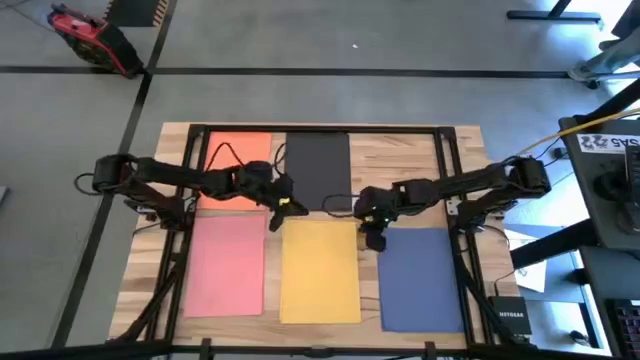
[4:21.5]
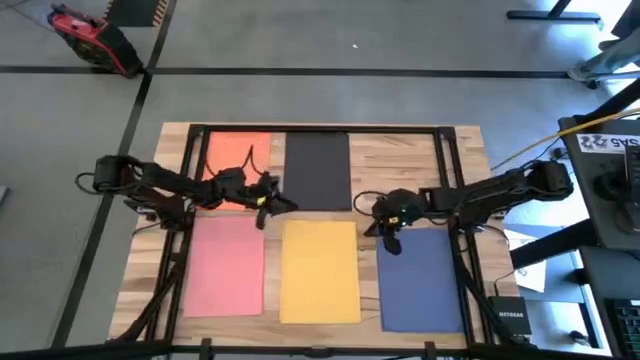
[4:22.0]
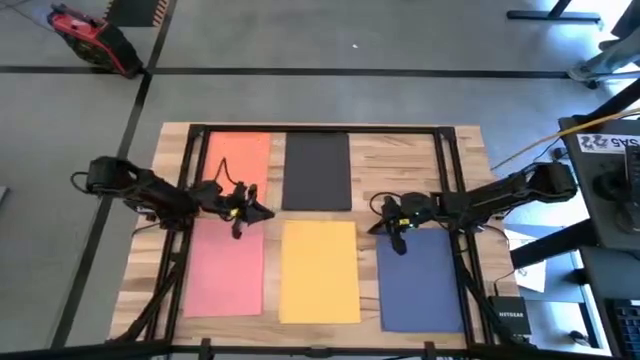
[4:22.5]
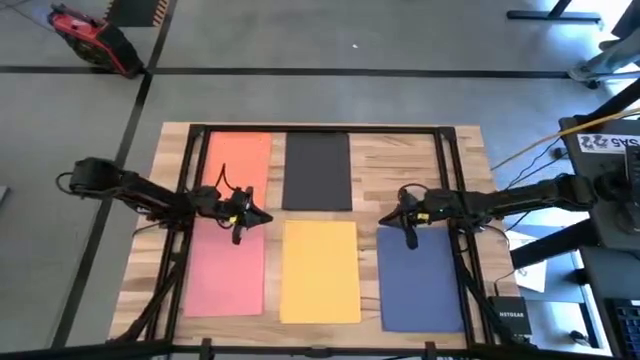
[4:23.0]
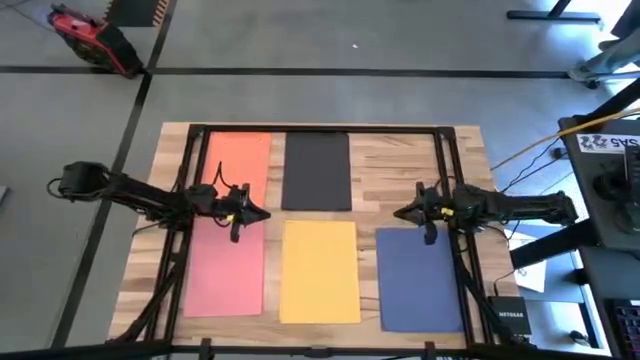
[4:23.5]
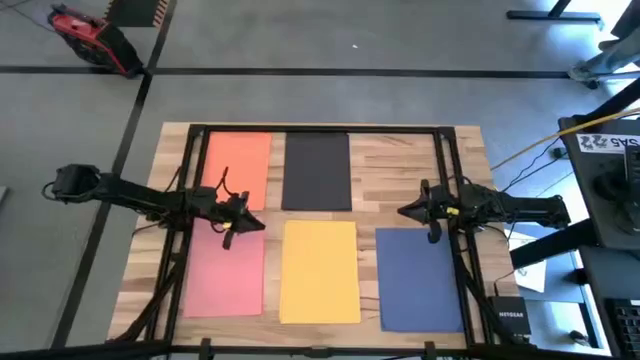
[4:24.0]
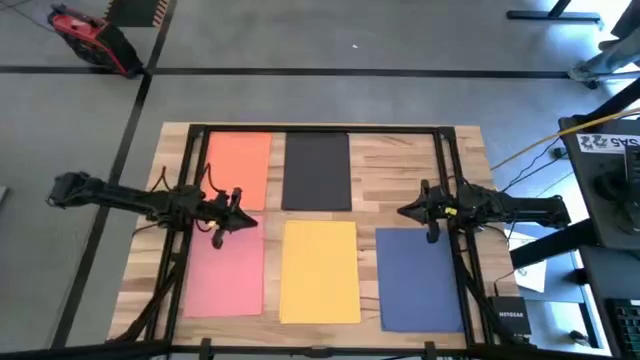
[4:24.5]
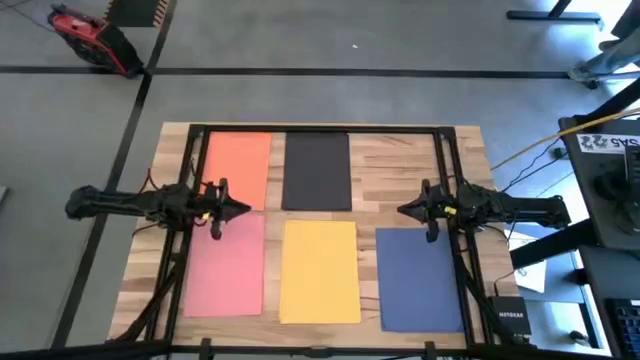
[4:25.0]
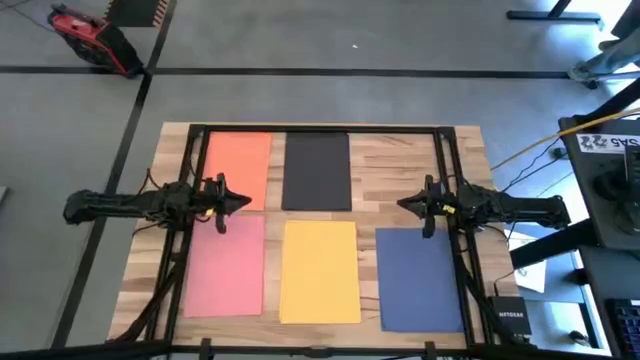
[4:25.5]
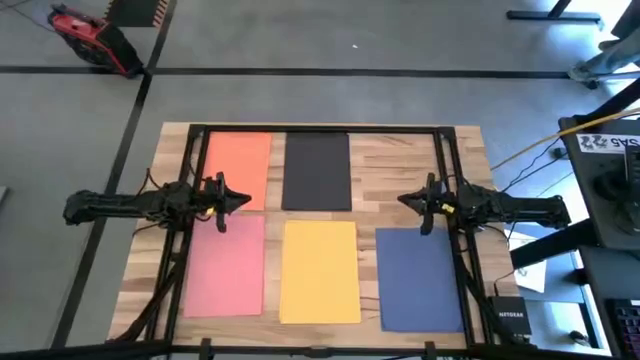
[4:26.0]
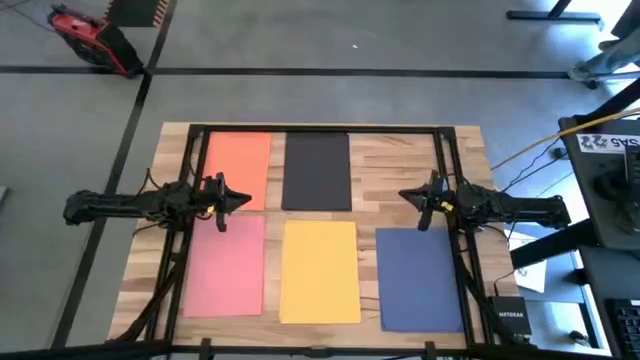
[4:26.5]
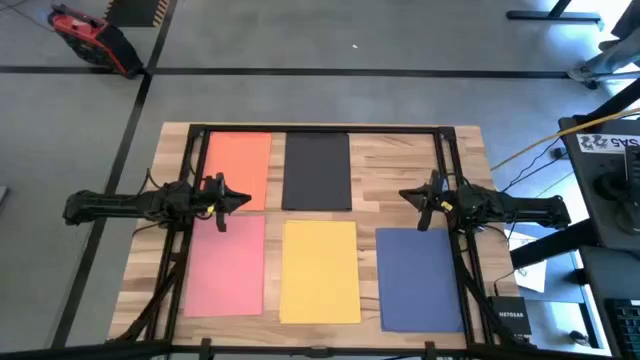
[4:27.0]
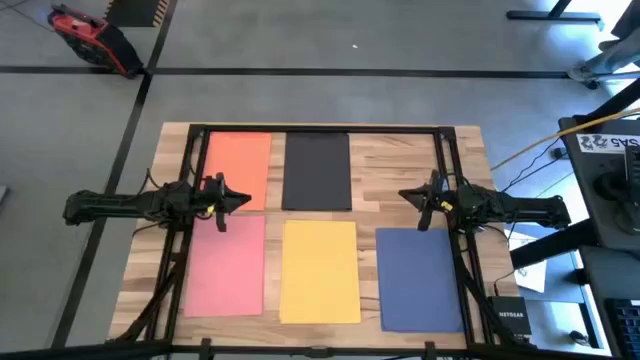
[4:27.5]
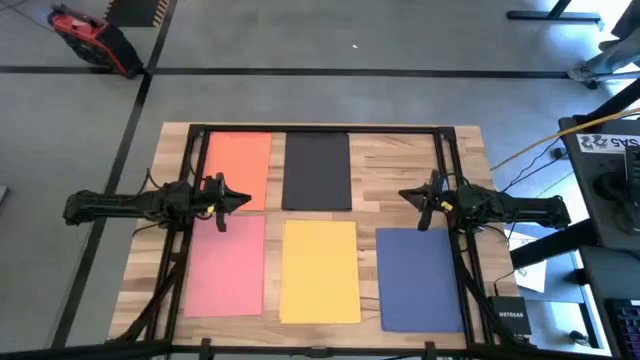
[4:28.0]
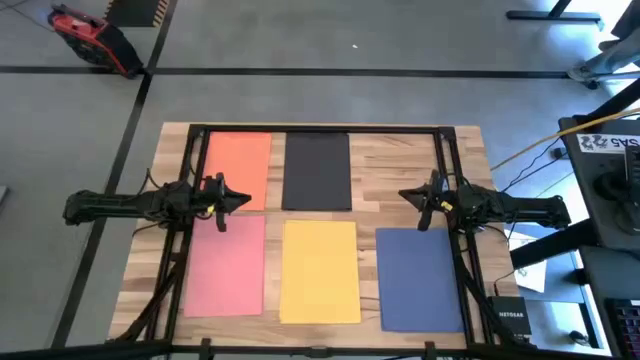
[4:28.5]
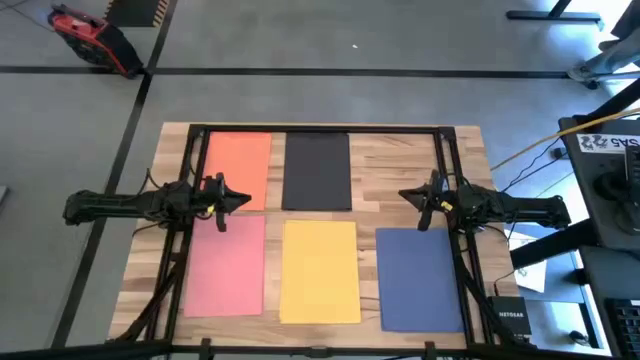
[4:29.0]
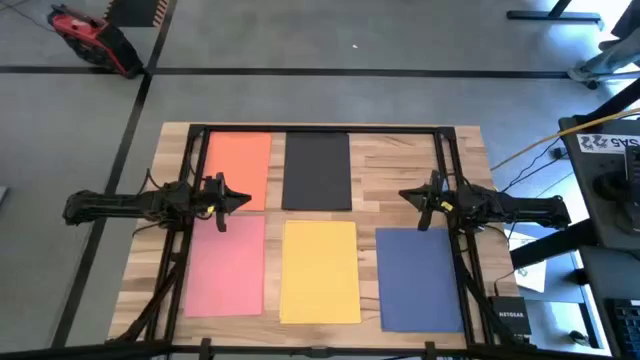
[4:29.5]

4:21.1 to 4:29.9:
Task: Organize paper
Return to Home Position

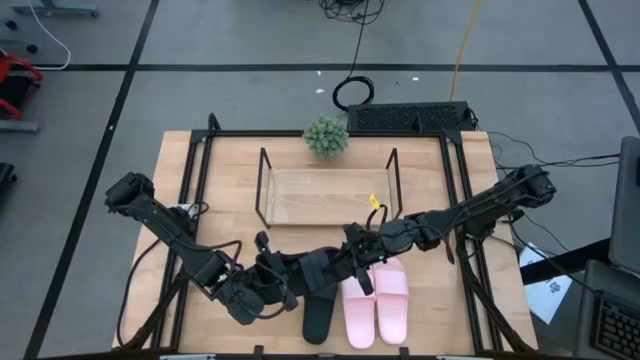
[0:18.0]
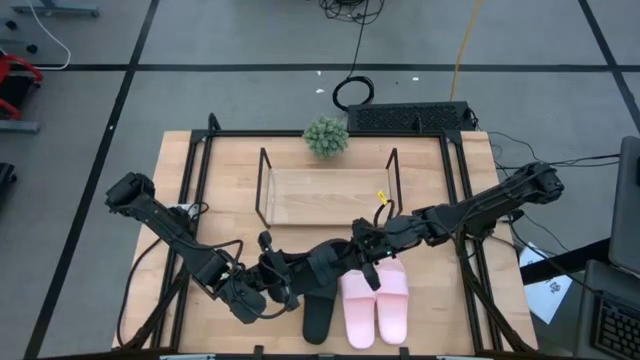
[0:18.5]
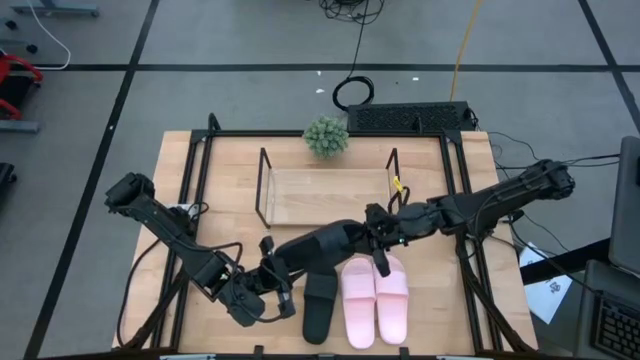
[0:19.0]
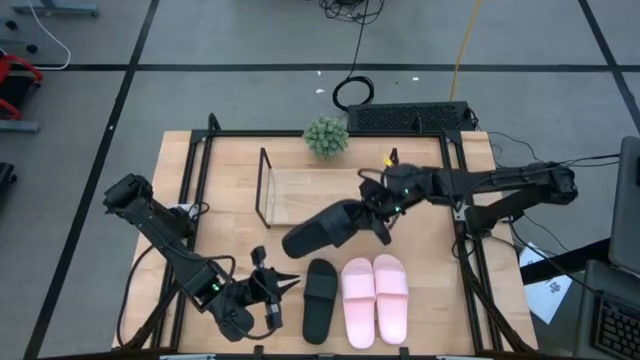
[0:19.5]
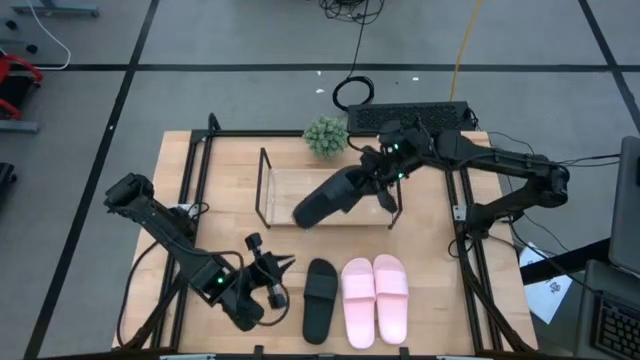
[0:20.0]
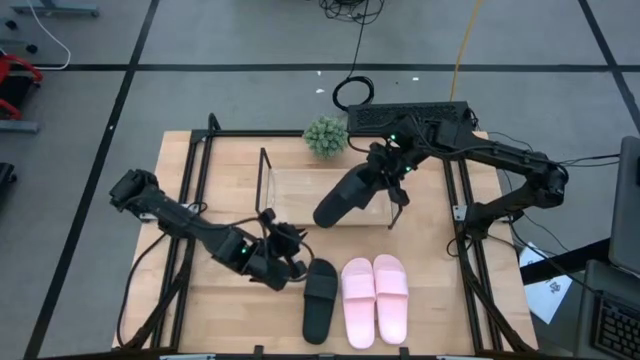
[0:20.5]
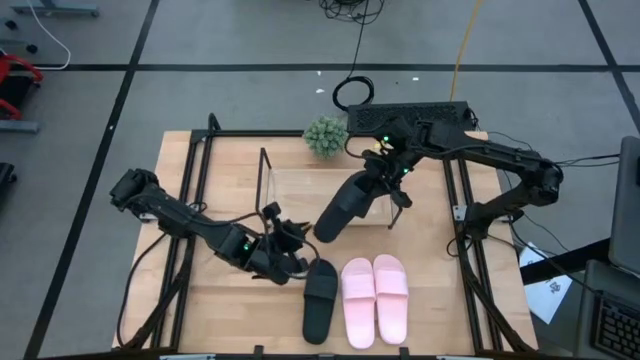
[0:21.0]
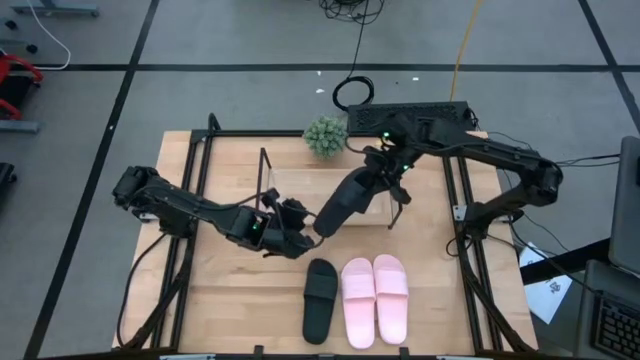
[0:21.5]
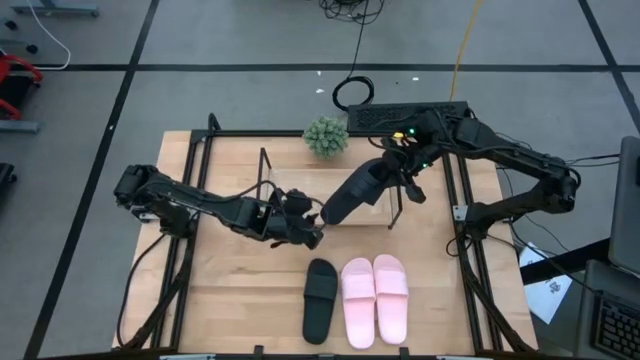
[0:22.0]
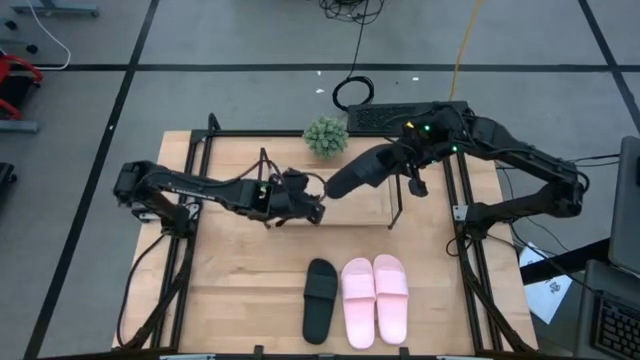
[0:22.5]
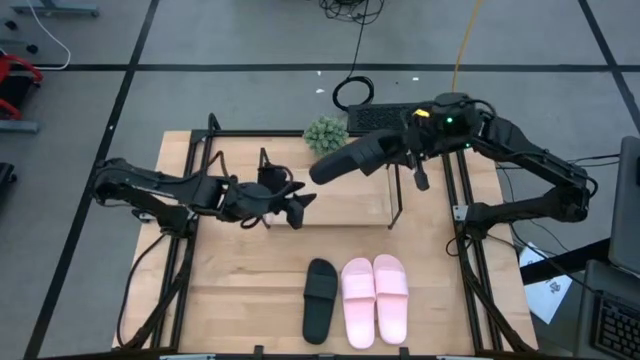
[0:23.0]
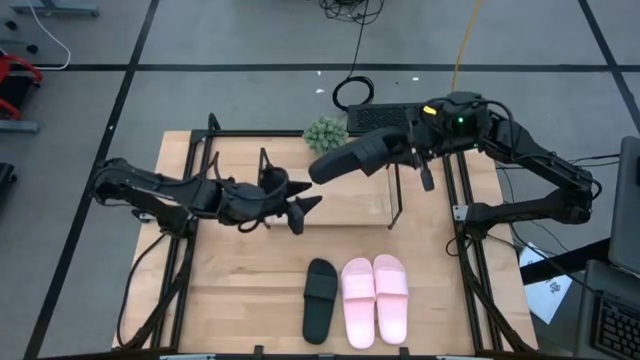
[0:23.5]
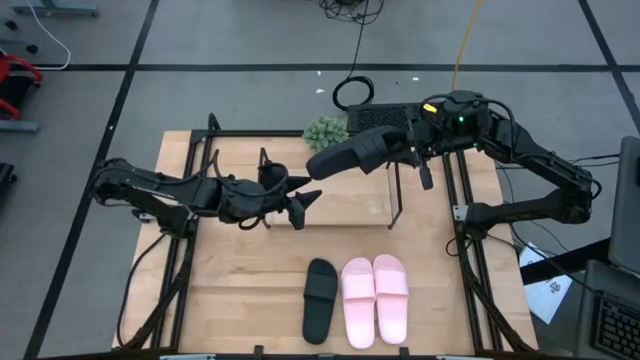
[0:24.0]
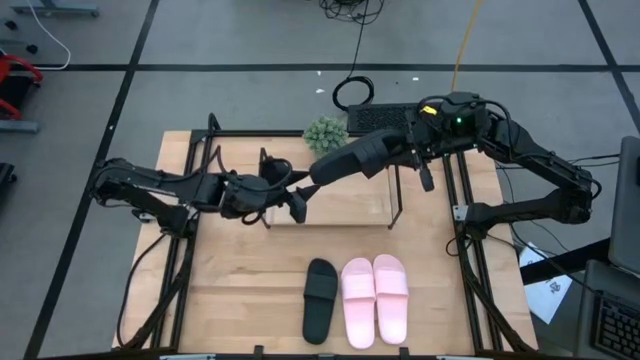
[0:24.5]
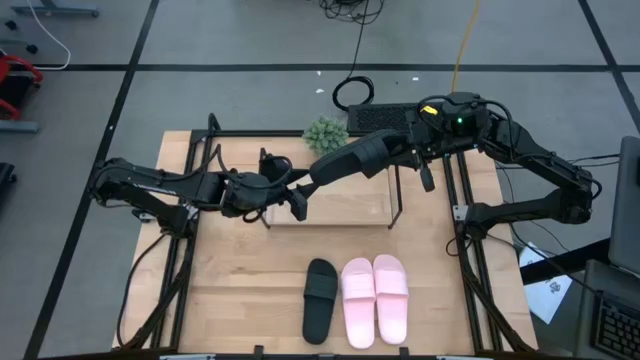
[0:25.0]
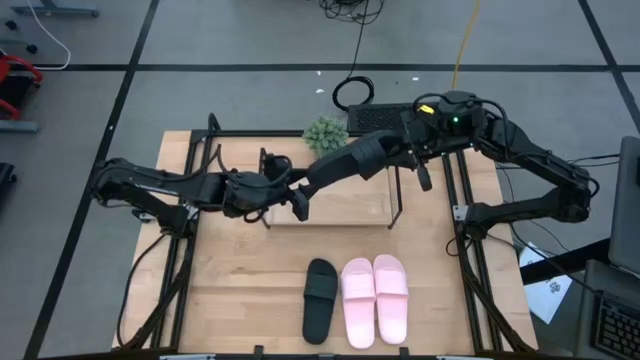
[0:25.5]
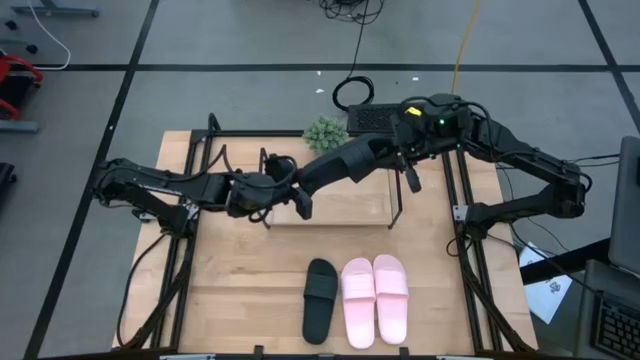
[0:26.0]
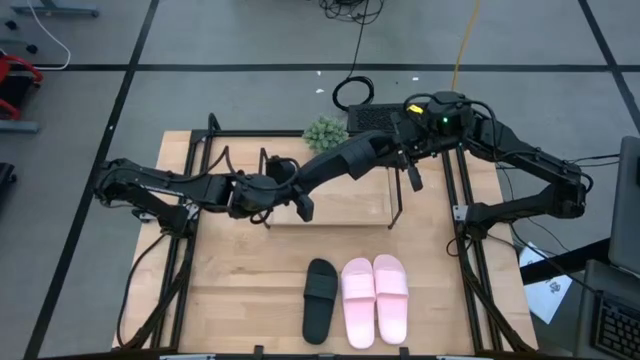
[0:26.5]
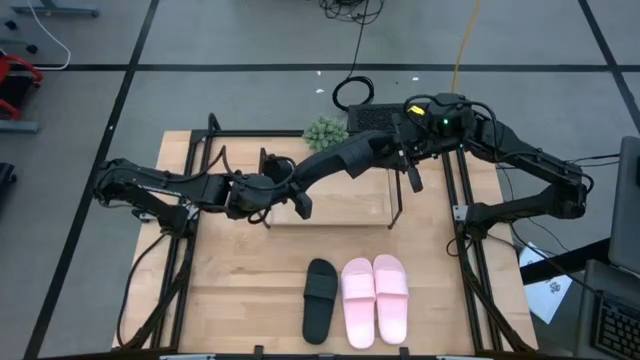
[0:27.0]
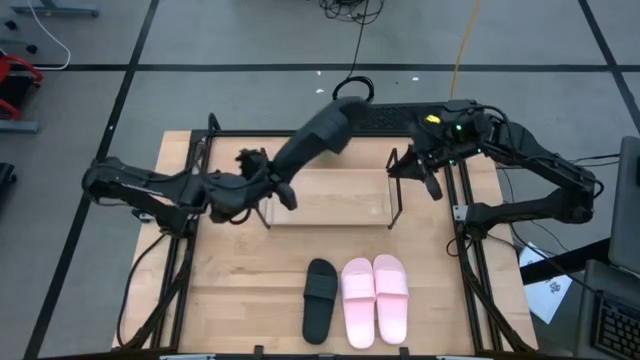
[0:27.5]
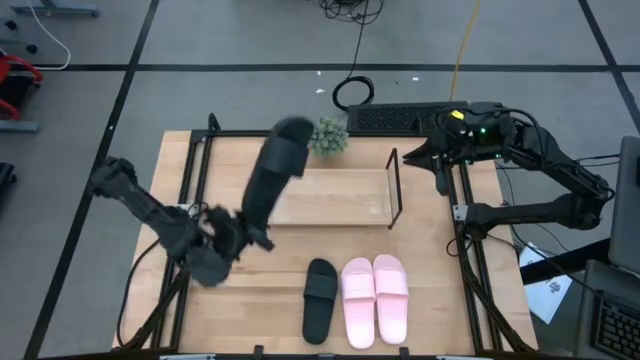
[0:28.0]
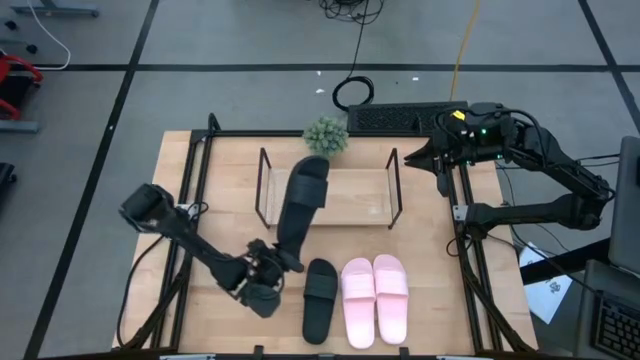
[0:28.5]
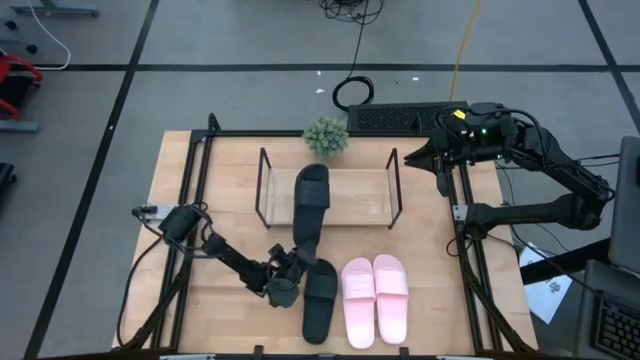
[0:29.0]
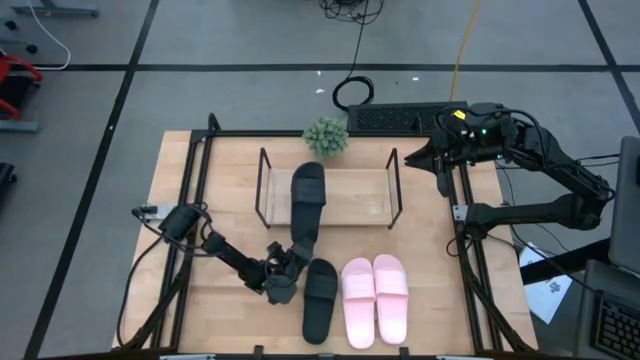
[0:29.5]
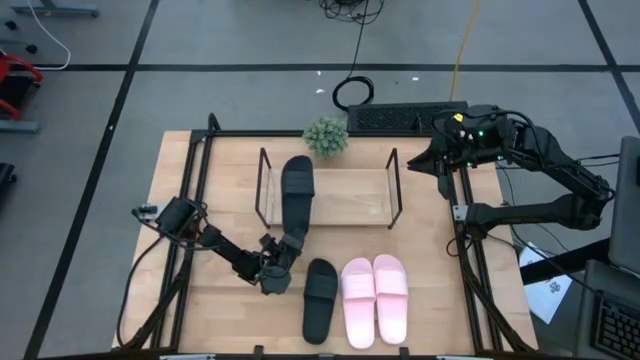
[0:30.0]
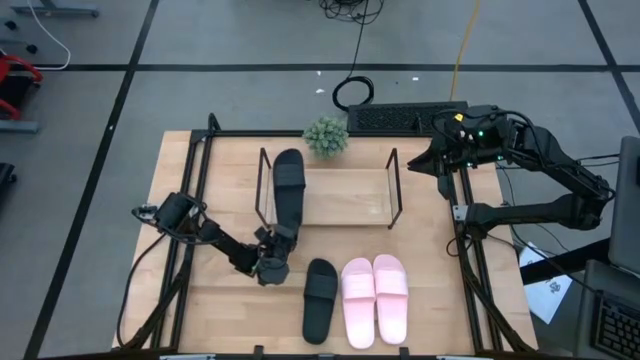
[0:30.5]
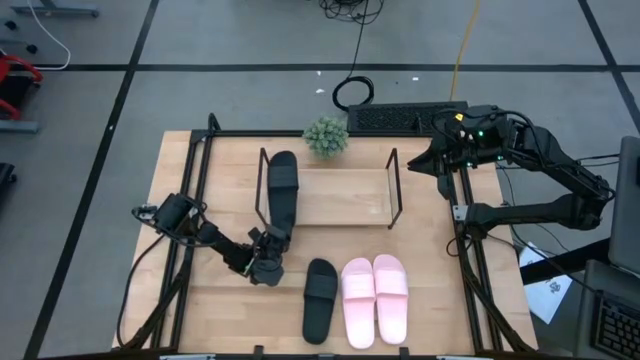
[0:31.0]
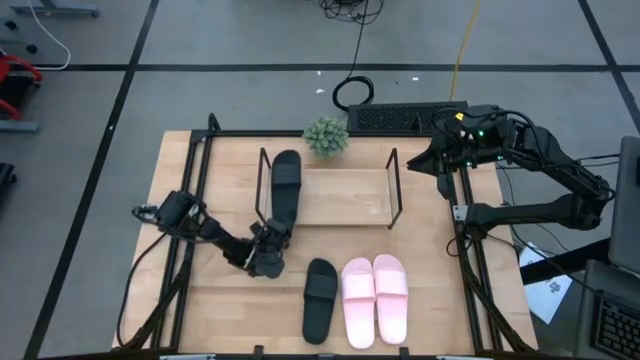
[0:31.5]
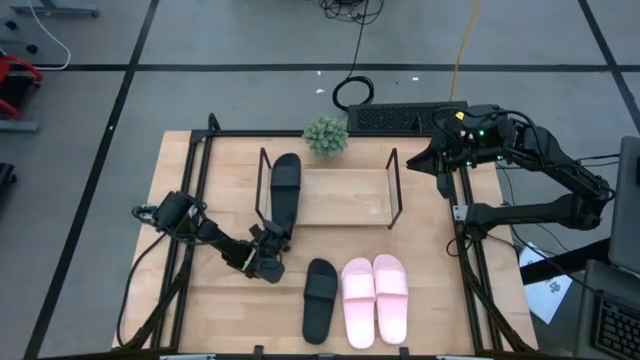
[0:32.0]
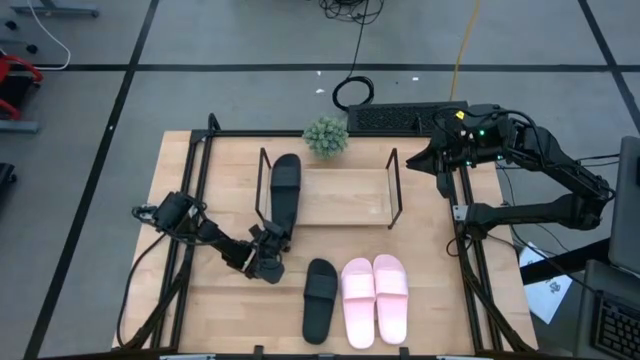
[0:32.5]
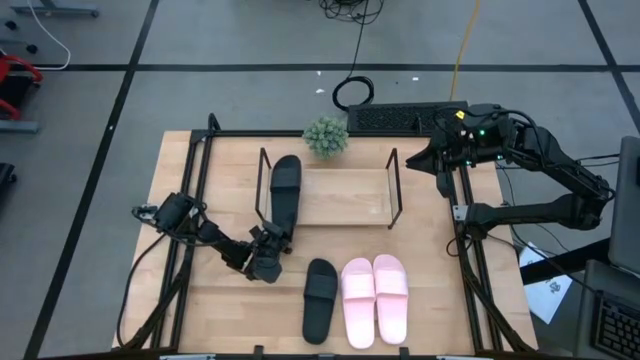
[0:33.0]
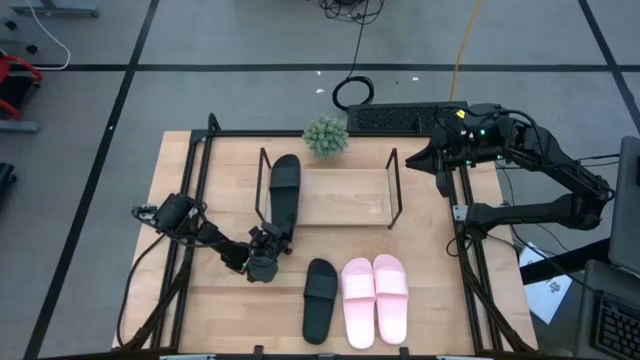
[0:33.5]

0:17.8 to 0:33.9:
Task: Pick and place slides into the shelf
Put the left black slides on the shelf
